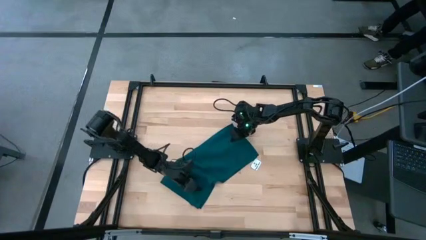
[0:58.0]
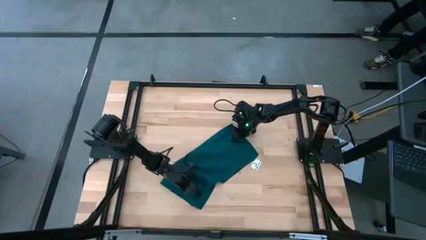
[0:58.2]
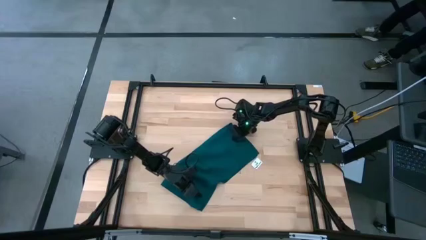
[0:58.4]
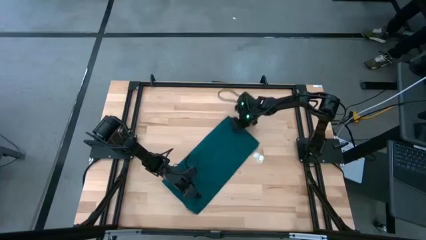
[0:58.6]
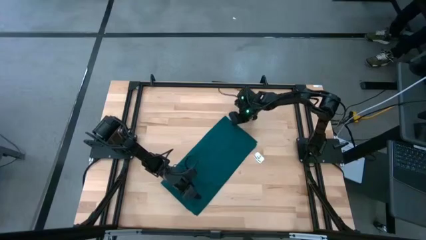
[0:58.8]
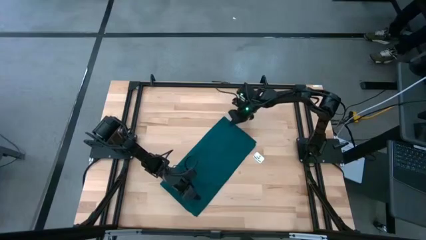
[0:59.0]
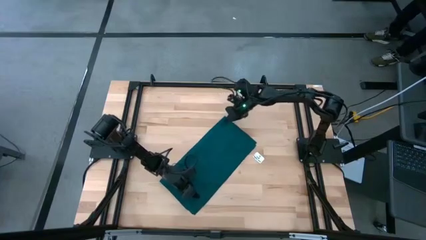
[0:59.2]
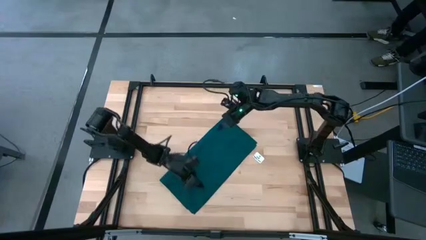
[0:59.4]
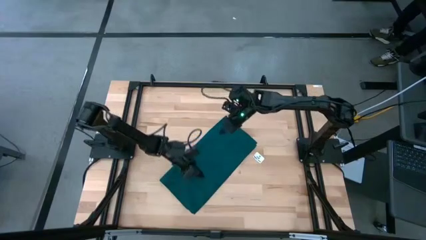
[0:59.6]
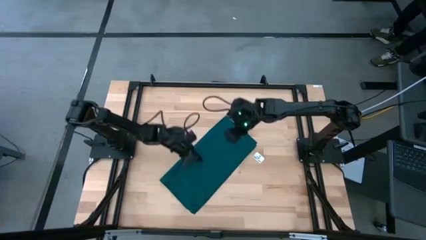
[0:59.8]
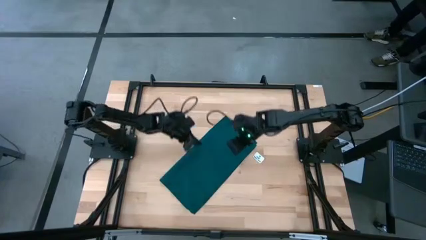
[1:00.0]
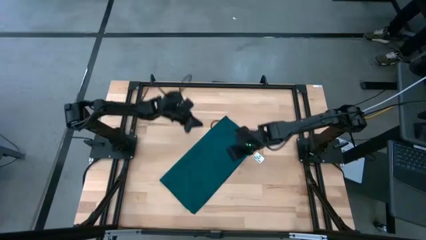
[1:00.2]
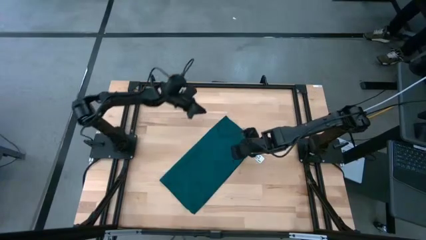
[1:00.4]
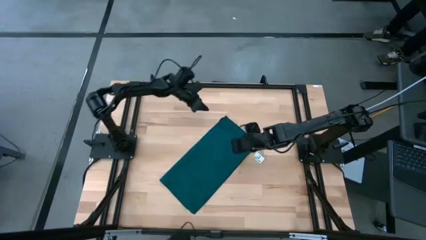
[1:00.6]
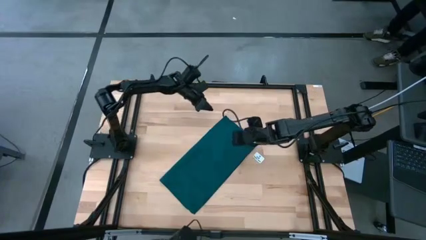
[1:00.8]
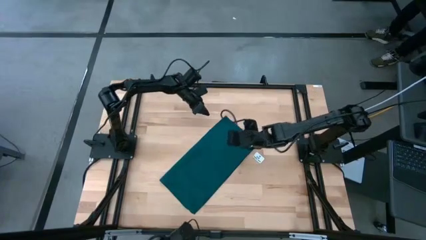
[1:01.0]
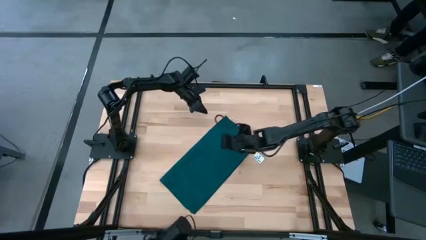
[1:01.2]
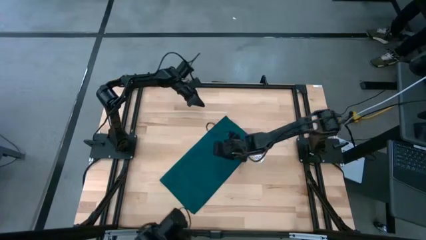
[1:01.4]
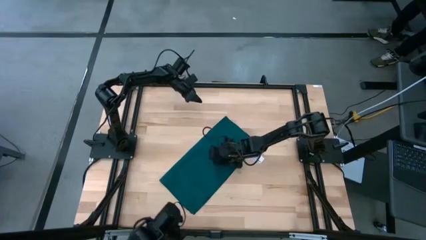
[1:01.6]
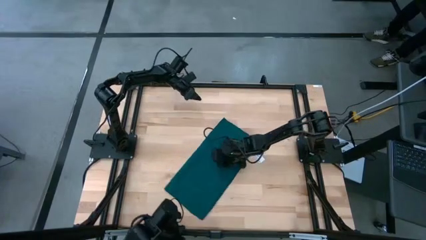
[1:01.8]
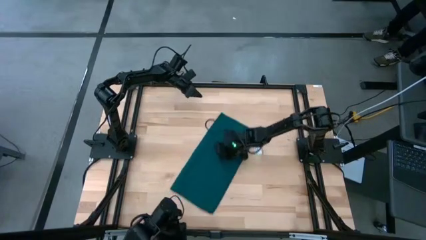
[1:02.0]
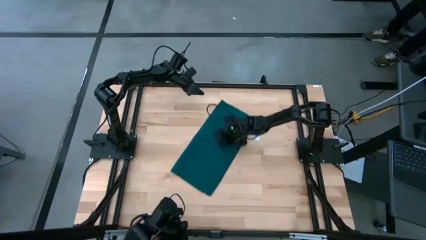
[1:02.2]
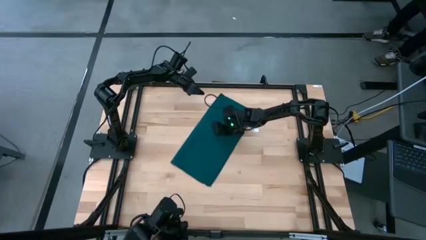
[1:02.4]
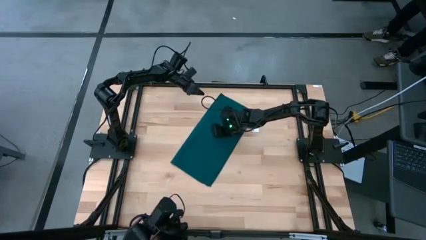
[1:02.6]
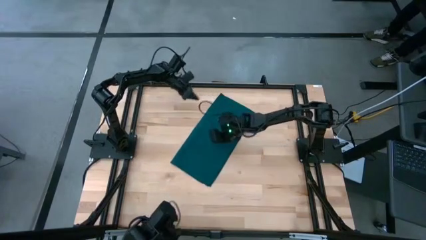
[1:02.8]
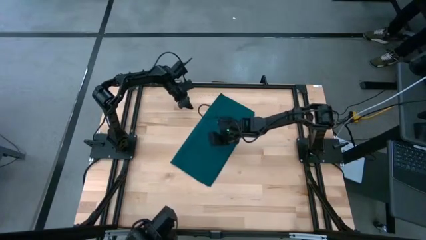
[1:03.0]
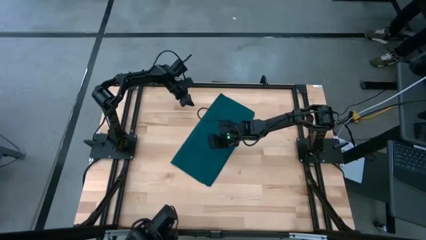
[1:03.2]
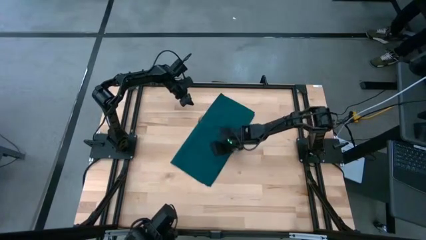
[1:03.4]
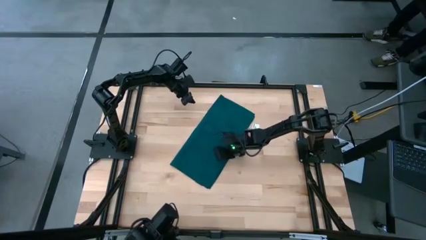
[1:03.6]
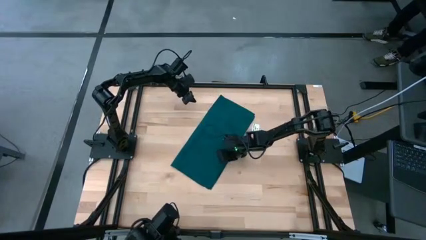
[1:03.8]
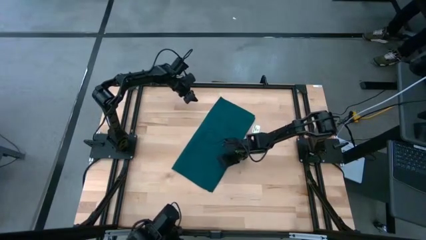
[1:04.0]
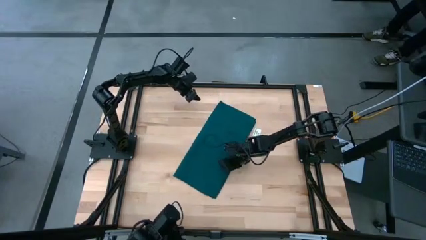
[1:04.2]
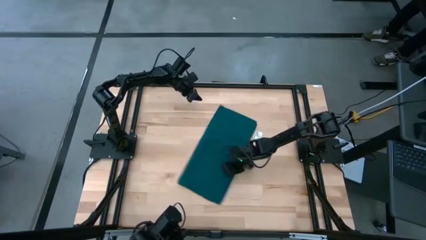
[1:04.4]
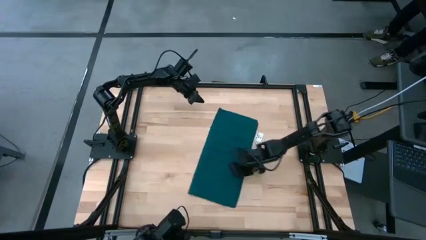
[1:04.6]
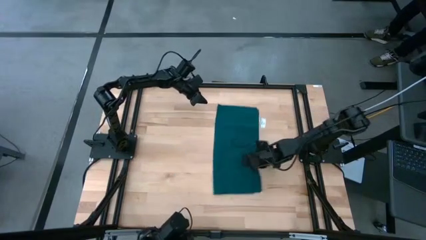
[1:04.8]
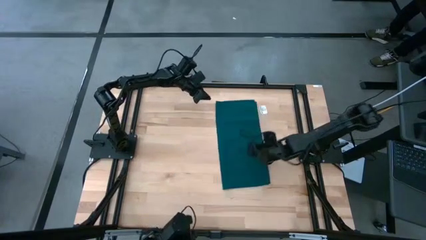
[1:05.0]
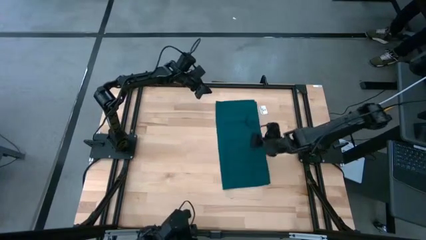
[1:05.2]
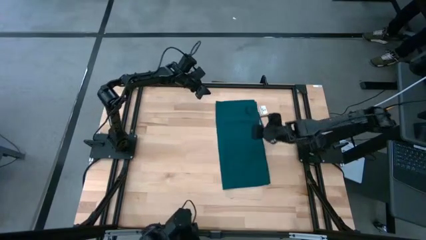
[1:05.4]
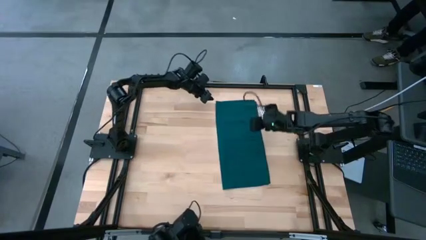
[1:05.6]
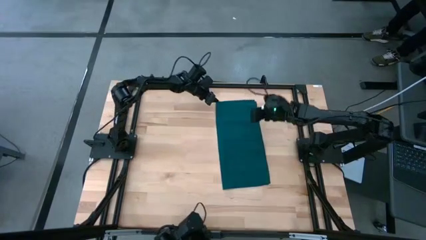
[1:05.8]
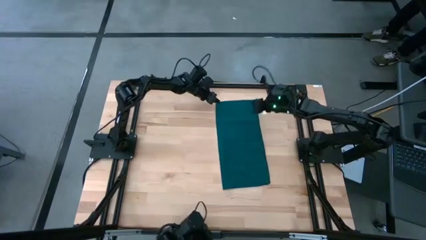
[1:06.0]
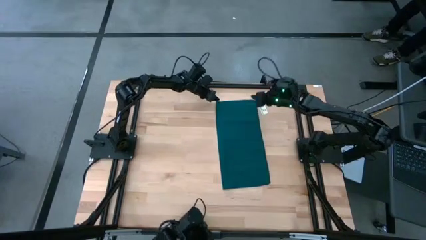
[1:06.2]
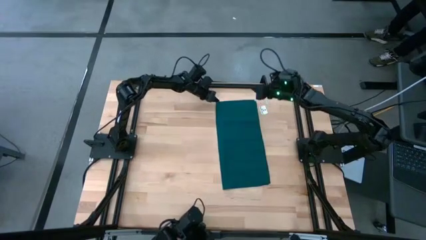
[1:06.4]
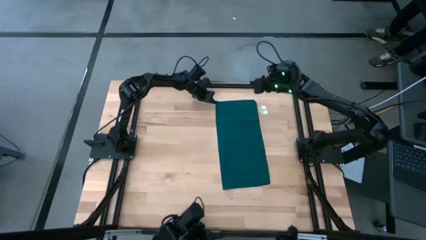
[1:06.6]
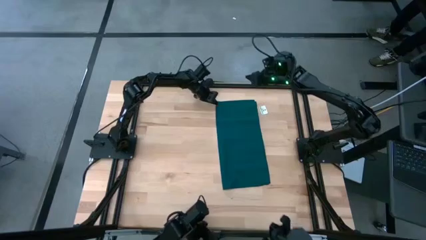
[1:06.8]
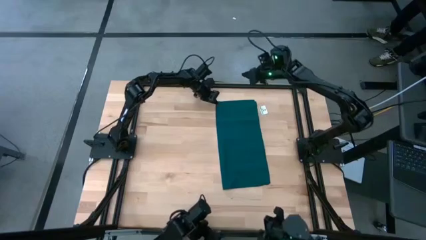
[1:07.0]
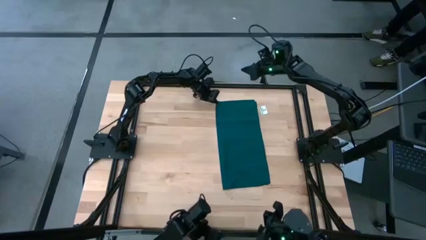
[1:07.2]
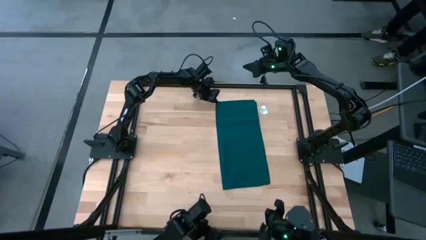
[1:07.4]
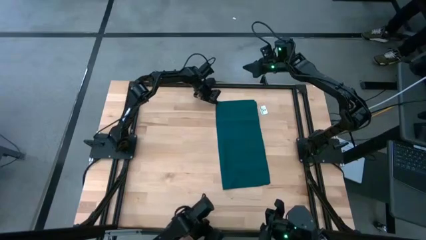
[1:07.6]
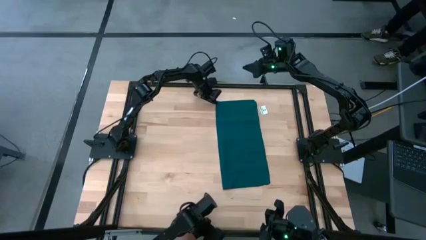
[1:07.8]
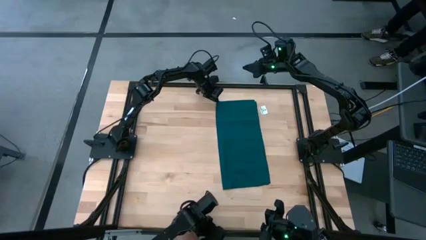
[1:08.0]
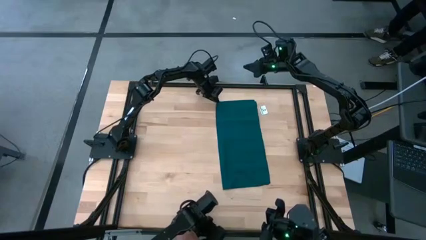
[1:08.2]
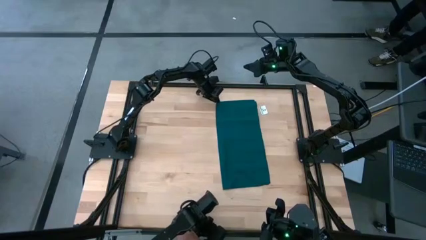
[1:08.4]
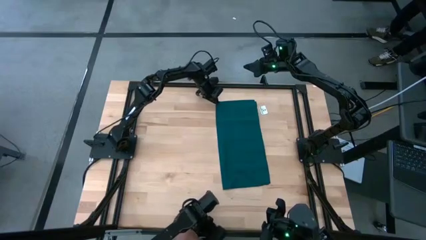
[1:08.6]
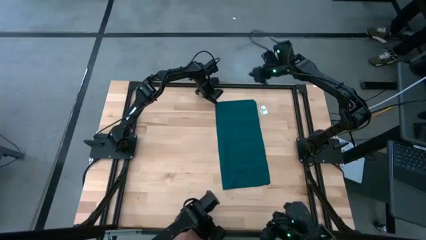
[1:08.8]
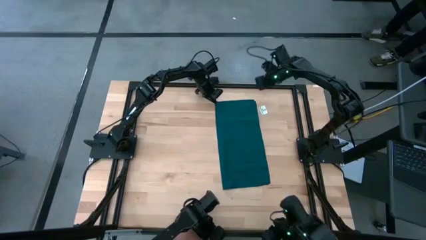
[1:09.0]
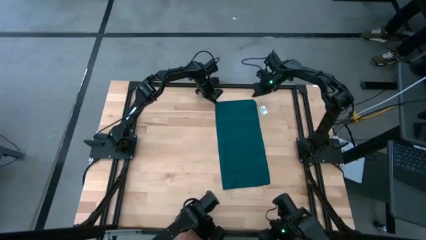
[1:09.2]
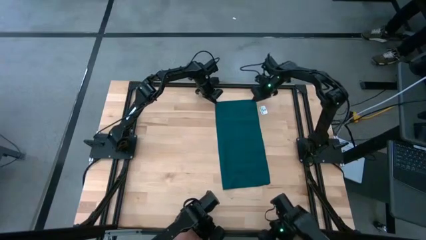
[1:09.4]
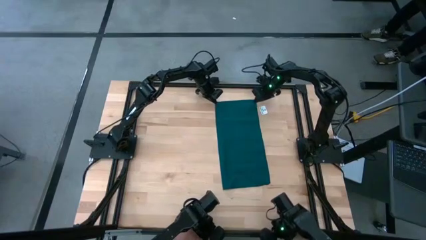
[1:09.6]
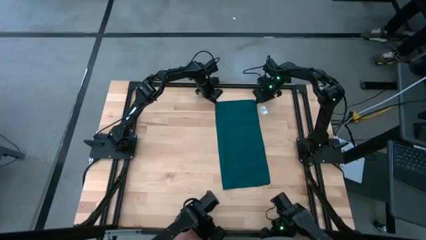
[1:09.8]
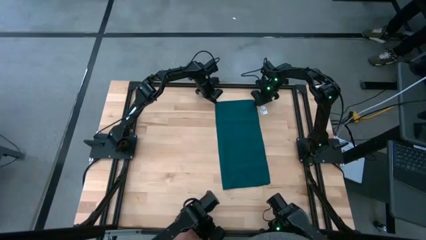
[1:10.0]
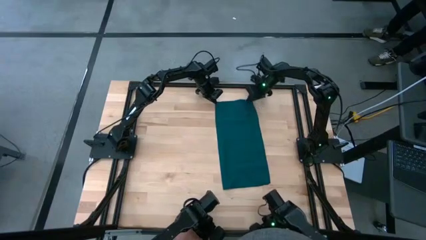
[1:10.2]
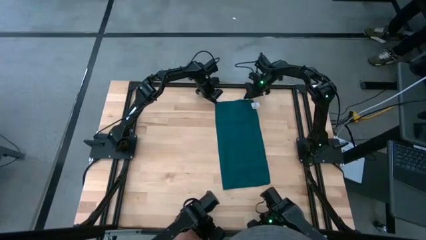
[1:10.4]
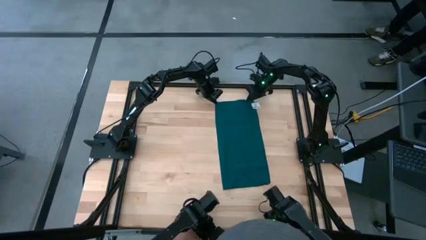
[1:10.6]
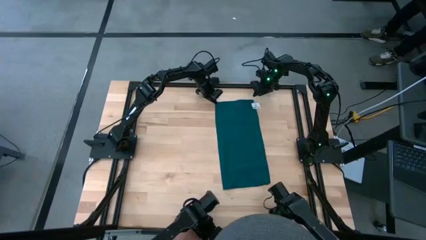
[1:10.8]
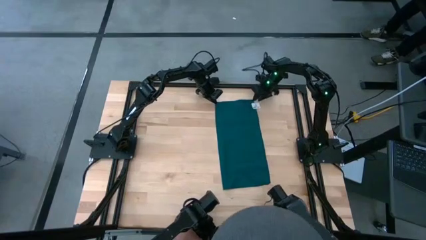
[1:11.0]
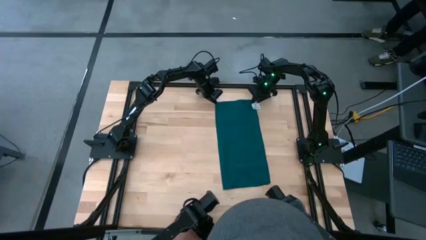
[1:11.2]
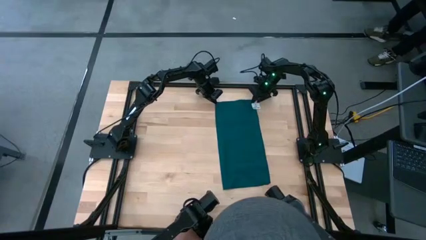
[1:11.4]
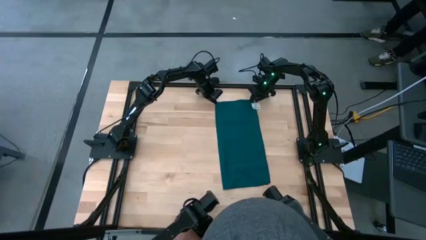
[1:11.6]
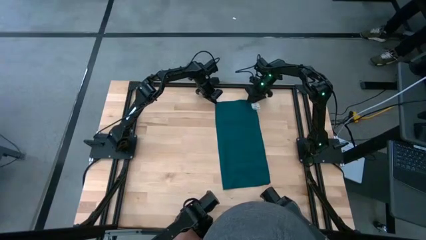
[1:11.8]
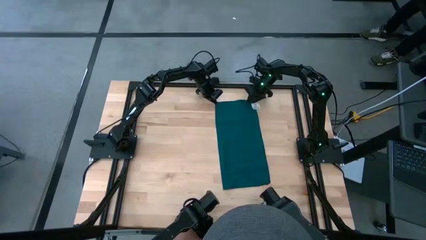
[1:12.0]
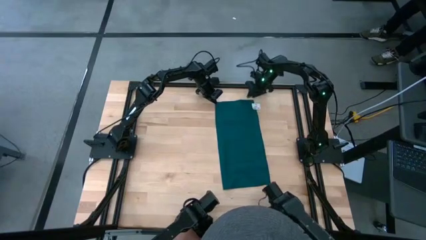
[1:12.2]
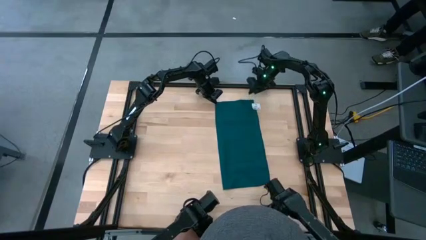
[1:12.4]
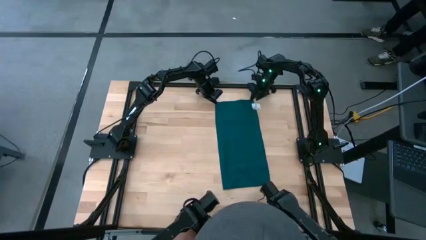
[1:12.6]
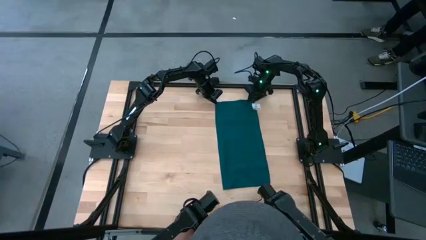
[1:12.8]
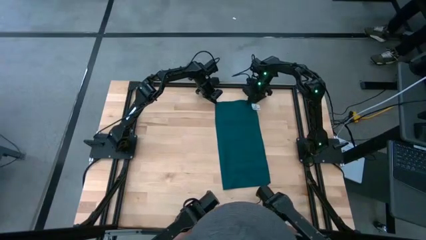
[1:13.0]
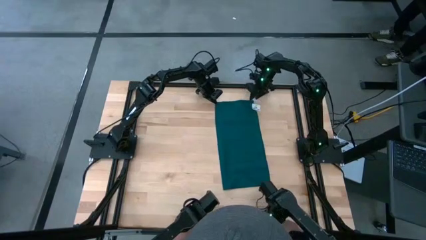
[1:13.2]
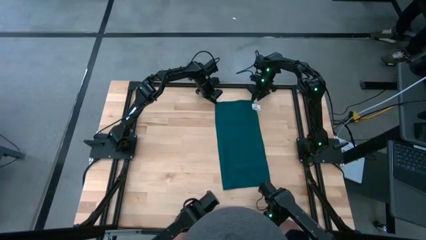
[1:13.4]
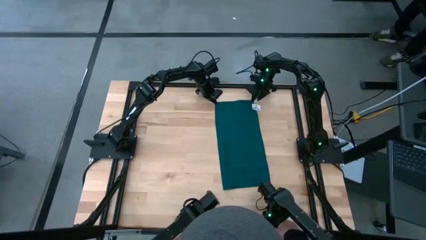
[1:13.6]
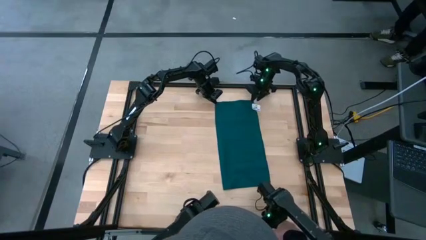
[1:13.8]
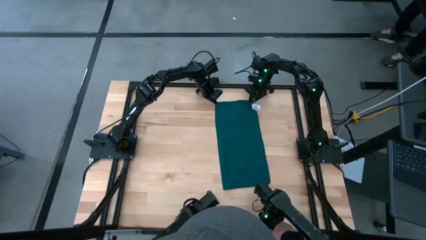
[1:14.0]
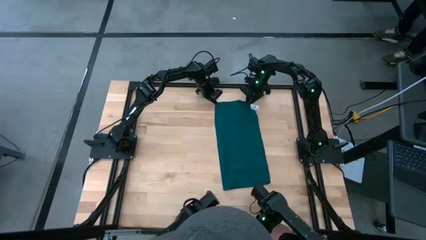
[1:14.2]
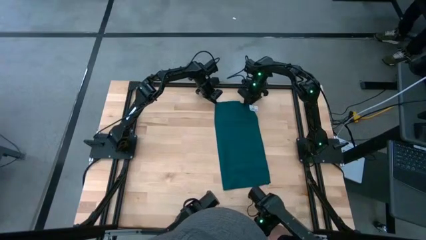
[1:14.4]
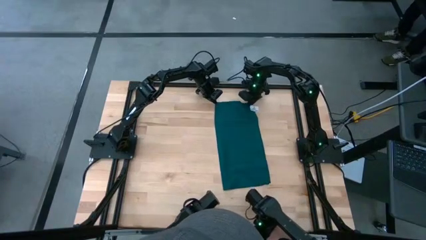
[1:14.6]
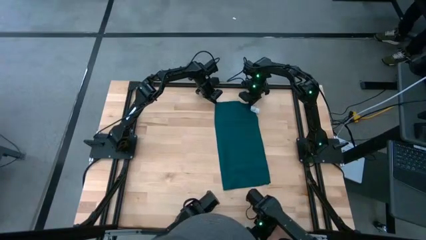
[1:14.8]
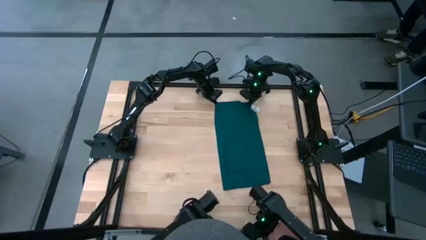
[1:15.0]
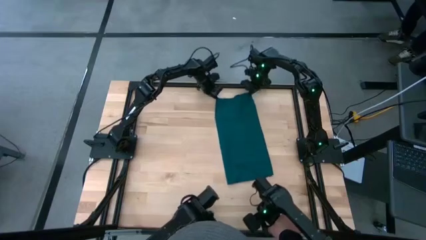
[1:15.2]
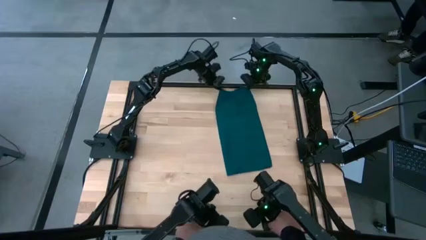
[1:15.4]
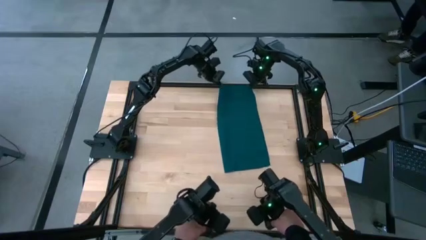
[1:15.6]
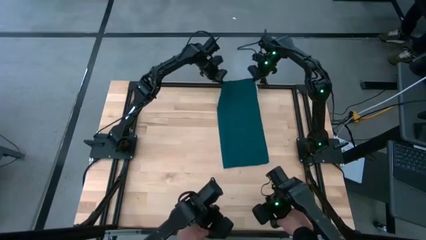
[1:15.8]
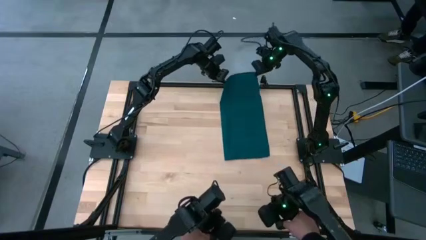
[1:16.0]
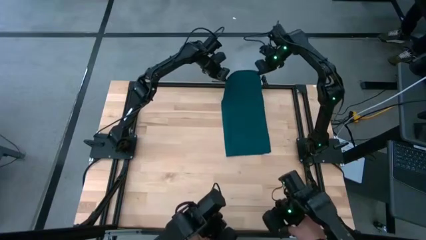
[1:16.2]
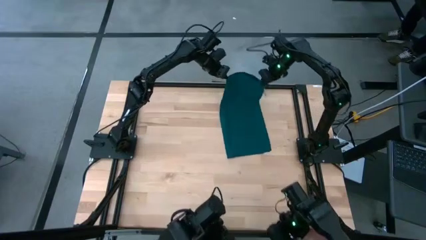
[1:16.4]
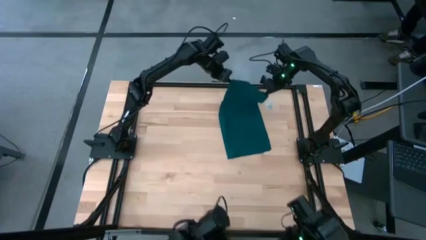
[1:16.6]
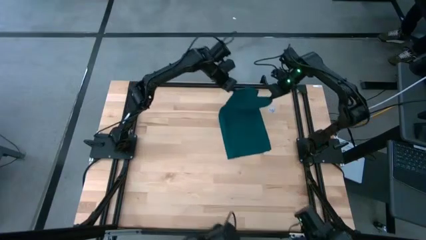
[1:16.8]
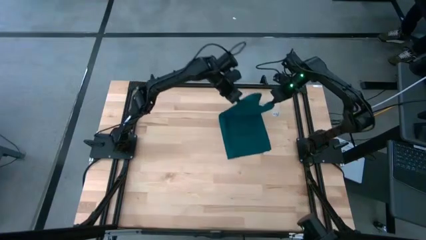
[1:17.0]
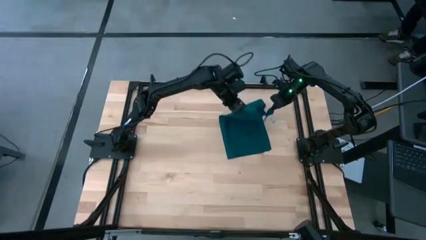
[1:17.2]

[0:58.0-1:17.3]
Task: Fold microfiber towels
Fold the black towel on the table
